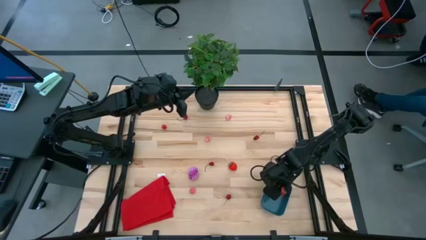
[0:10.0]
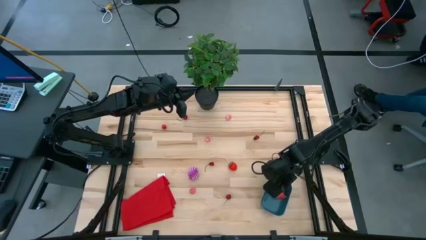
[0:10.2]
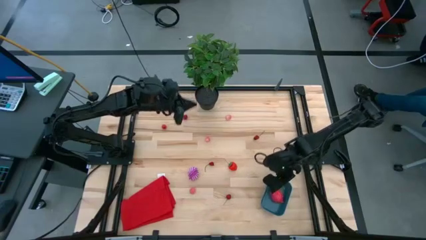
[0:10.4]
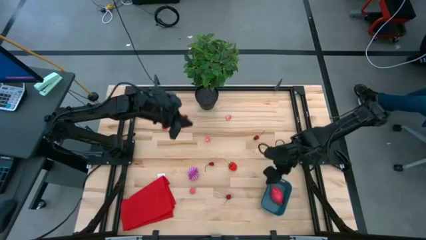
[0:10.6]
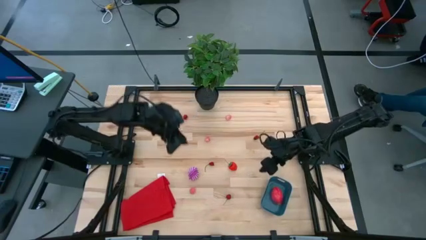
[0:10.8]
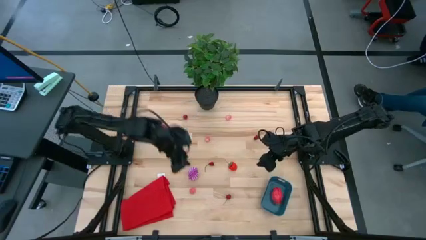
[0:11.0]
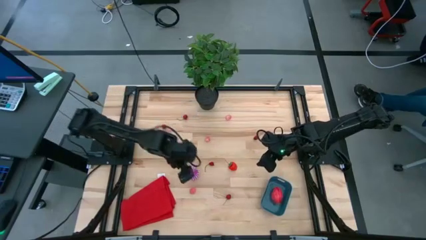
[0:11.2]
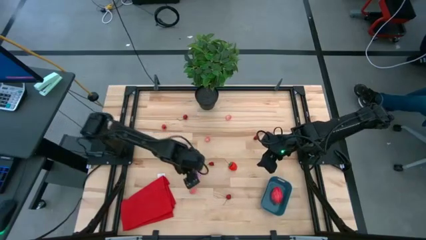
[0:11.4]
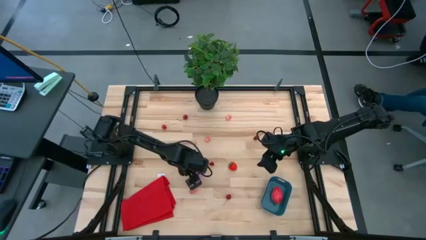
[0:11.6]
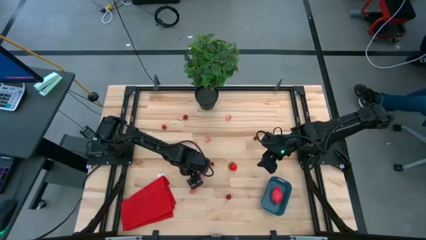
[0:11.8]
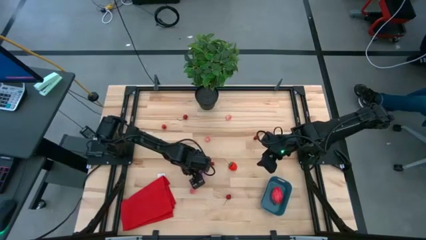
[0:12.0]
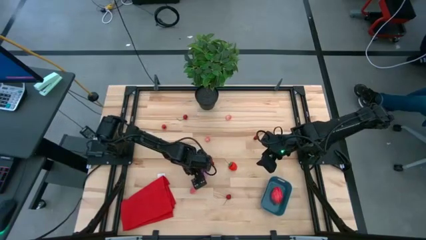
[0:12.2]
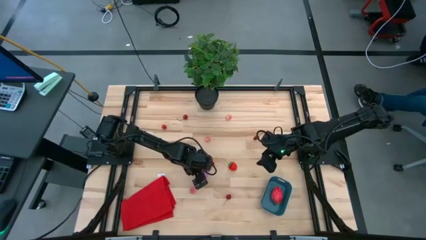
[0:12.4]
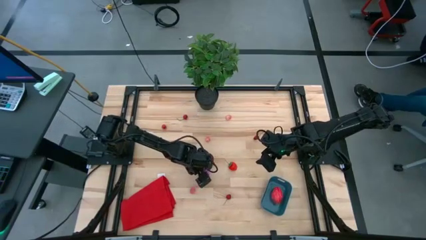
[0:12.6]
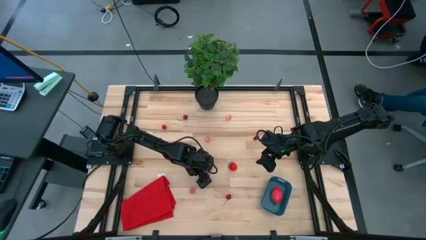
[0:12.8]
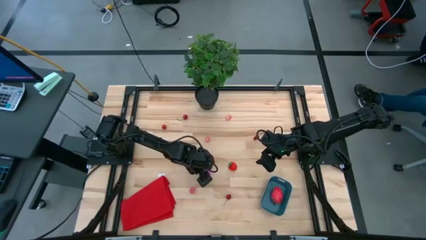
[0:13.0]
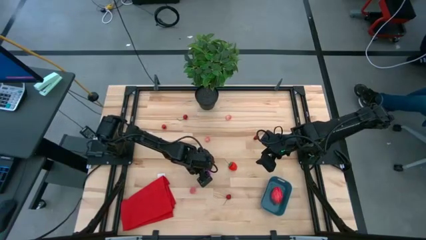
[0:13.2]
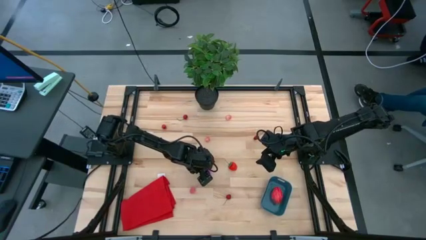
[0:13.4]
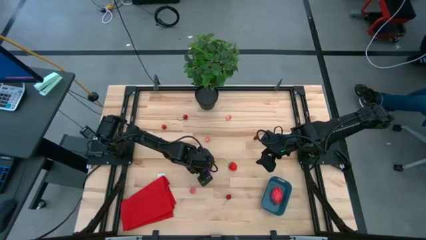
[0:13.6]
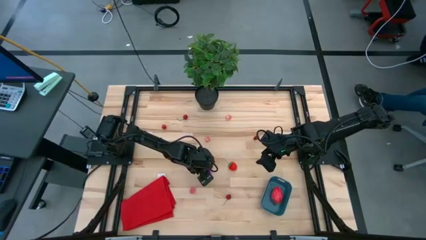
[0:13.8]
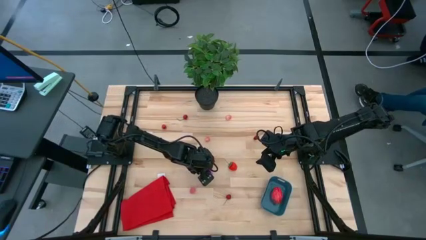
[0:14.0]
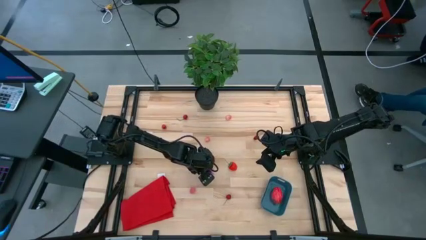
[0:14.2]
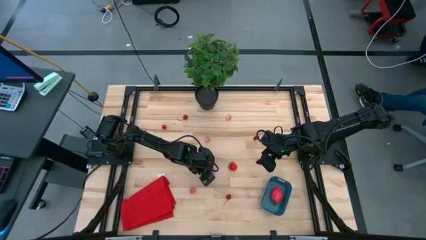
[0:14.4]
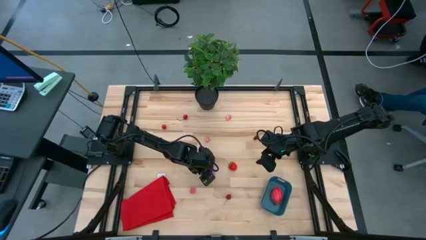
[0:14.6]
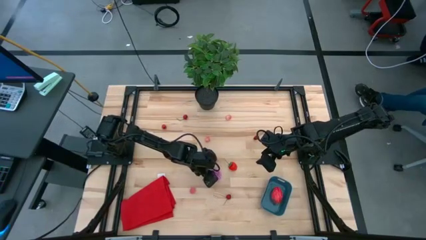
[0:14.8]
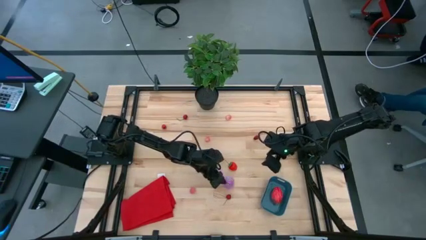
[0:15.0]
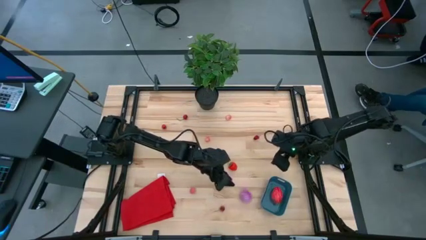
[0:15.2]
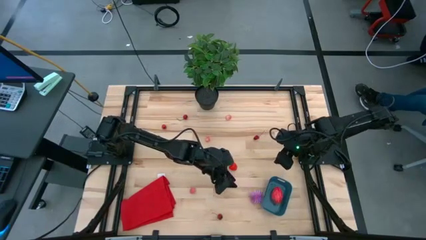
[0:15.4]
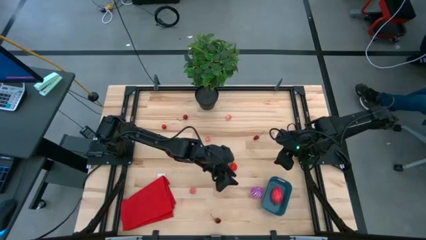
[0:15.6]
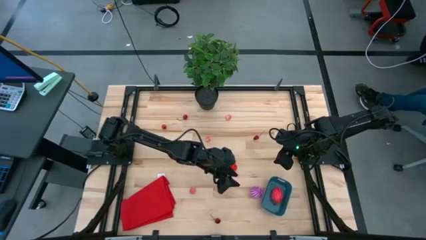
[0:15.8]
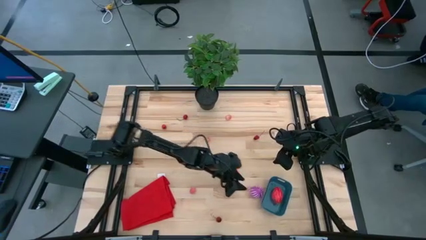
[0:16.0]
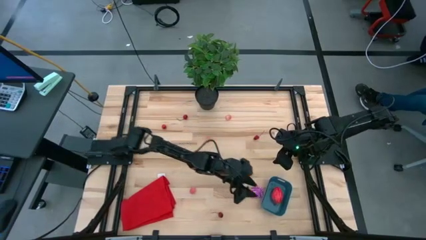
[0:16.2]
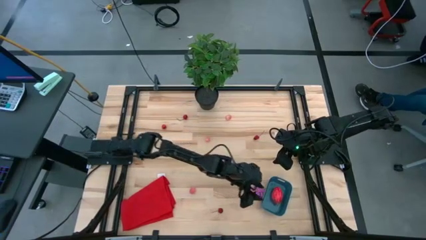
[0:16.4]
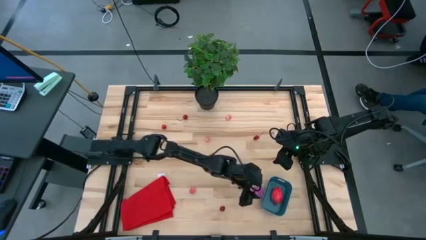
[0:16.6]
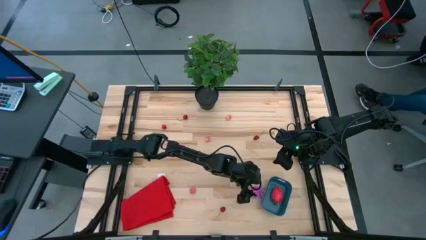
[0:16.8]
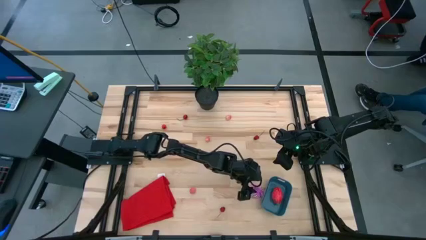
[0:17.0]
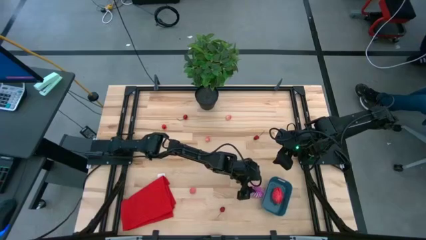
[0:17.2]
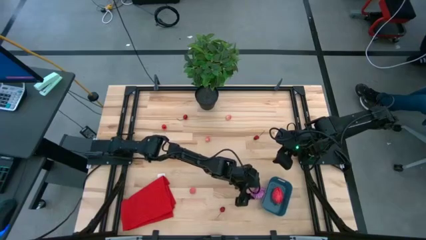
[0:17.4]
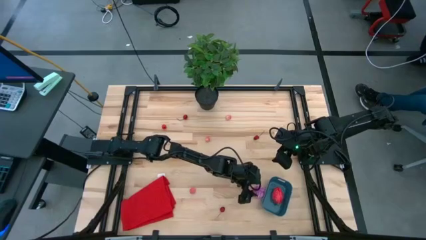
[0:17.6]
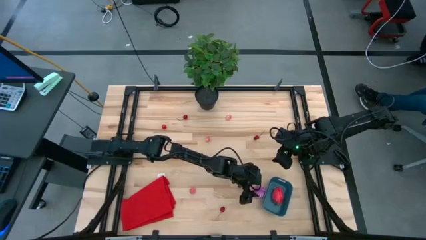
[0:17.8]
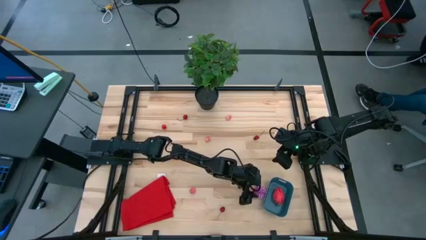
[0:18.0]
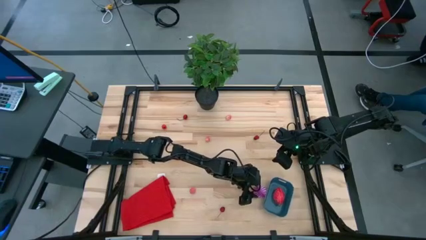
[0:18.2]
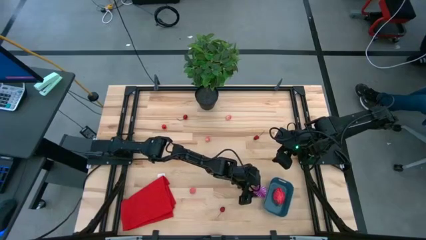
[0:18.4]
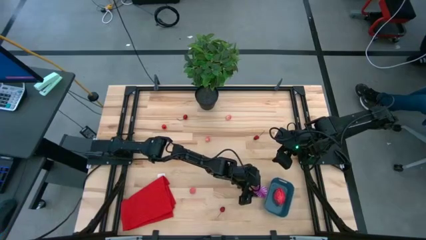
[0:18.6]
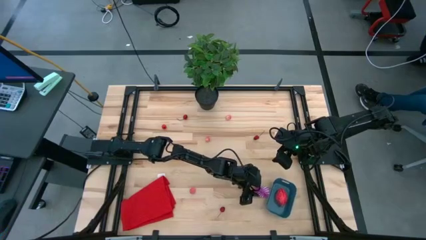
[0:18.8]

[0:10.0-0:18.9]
Task: Pick and placing Produce into tupperware
Put the onion into the bin

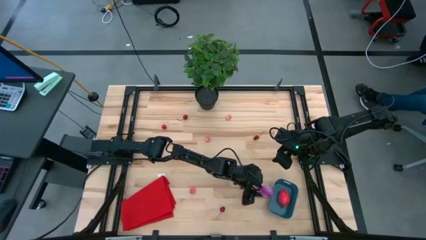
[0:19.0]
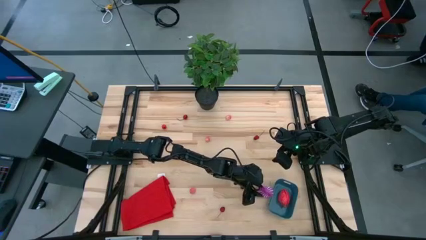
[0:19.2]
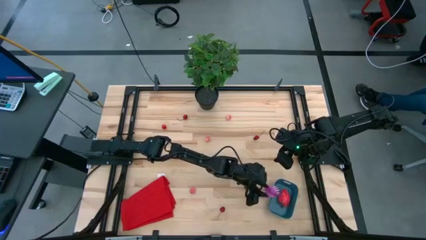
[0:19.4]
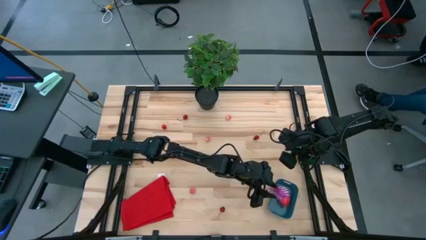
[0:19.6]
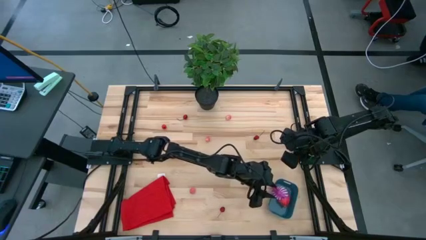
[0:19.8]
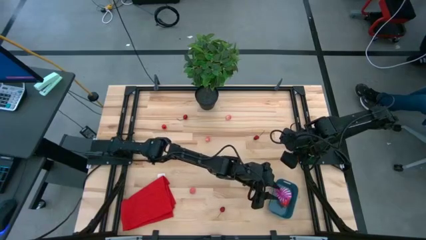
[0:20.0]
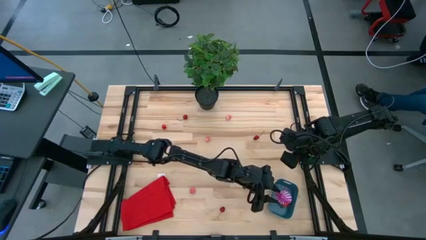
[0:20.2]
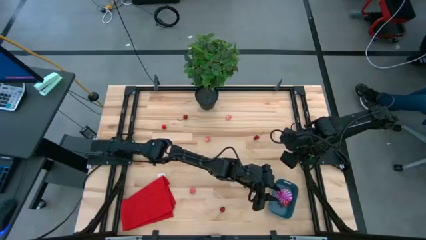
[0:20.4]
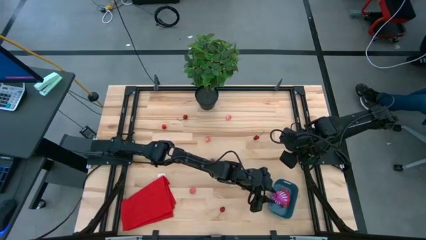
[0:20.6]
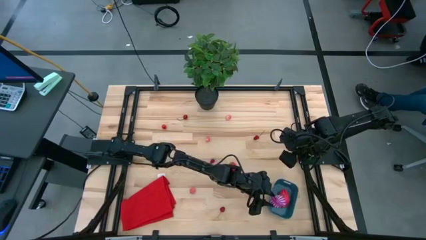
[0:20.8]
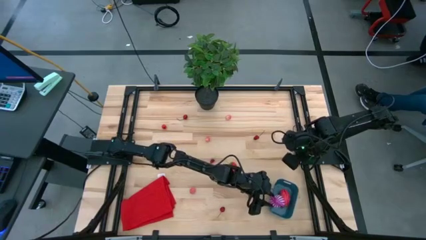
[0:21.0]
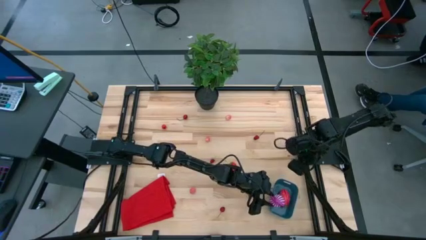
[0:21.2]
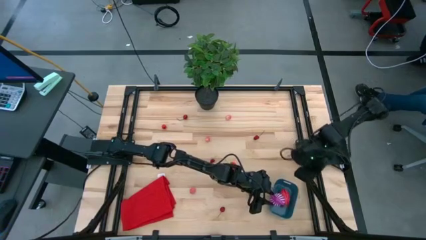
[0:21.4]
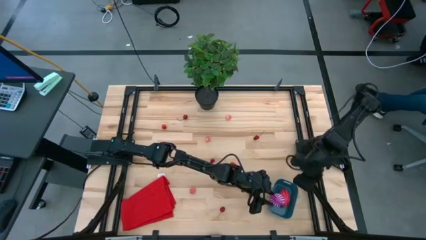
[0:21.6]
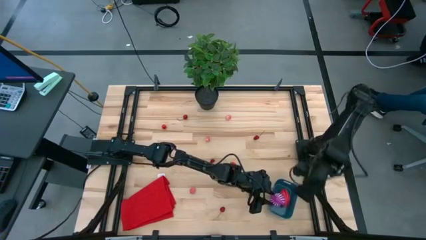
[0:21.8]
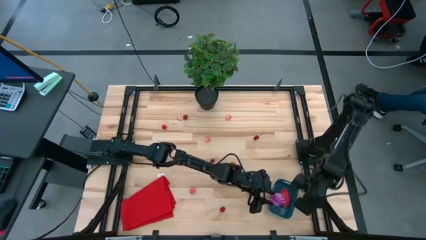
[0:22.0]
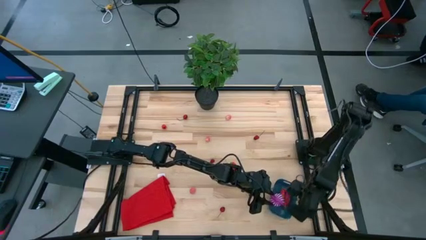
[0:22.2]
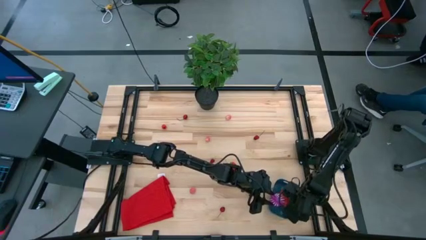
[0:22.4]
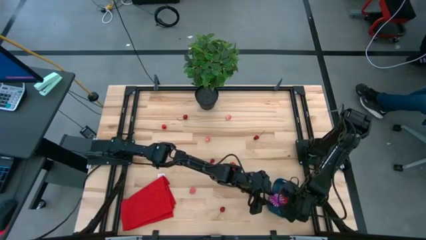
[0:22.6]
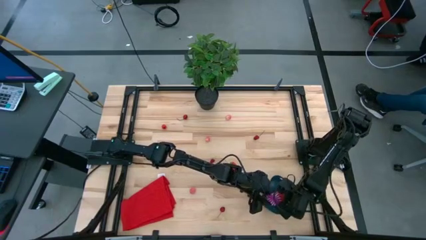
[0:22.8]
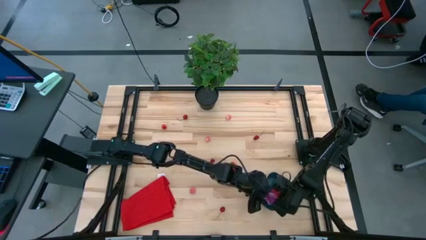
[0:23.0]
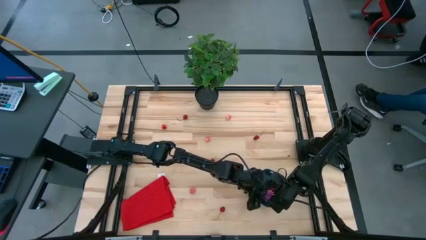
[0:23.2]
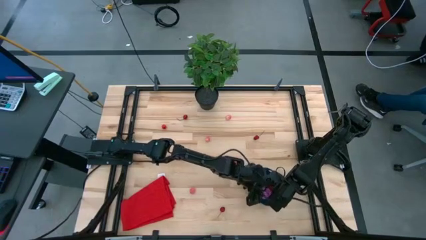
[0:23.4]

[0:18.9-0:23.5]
Put the onion into the bin

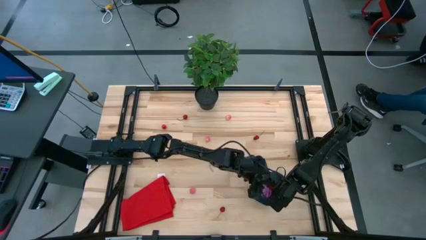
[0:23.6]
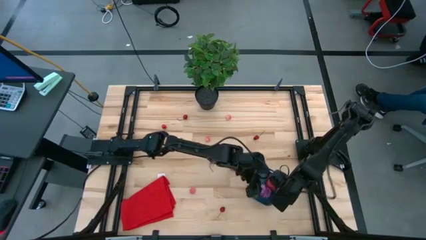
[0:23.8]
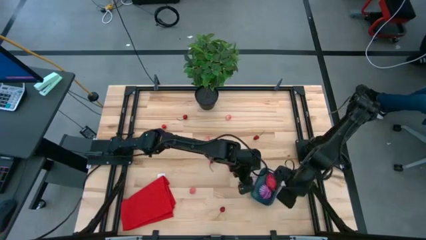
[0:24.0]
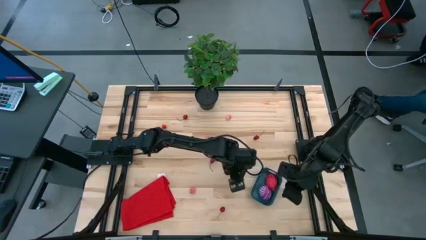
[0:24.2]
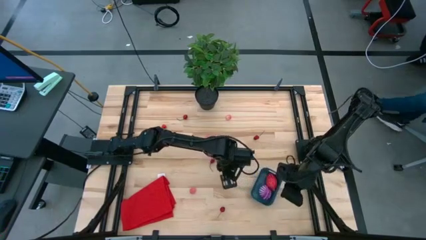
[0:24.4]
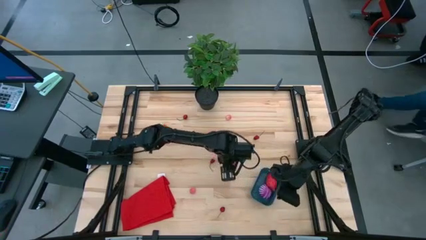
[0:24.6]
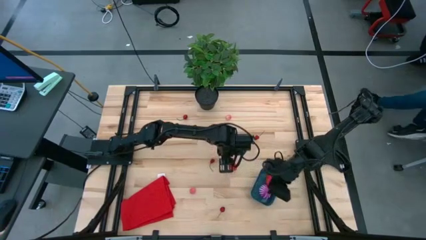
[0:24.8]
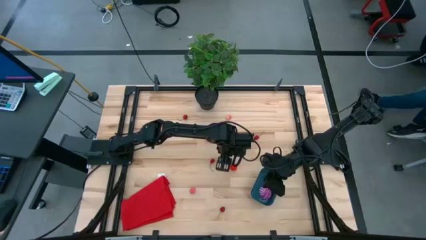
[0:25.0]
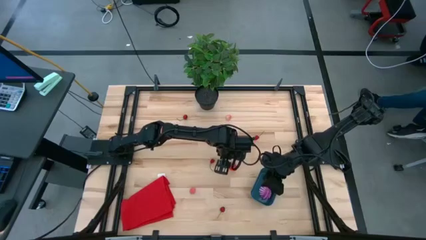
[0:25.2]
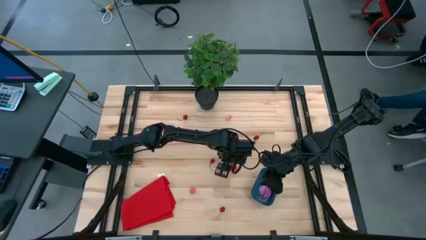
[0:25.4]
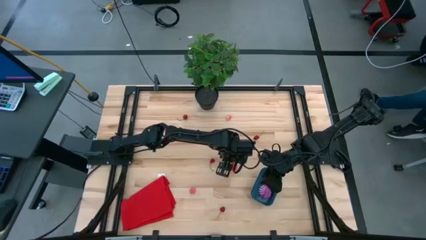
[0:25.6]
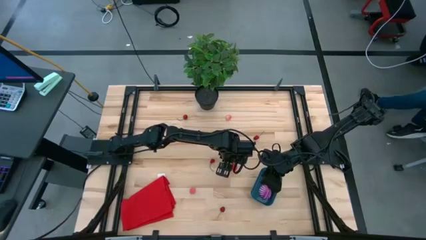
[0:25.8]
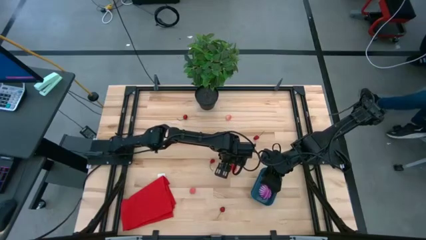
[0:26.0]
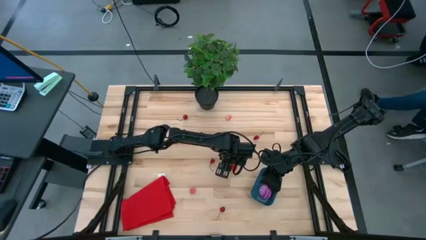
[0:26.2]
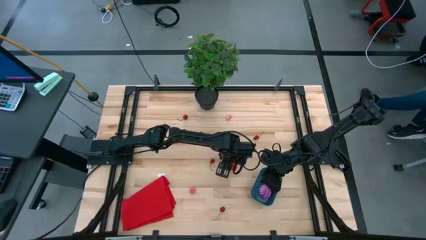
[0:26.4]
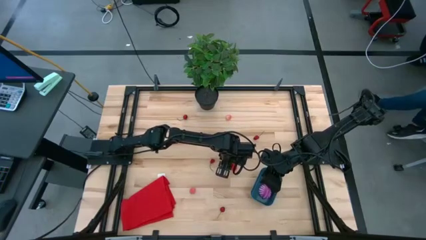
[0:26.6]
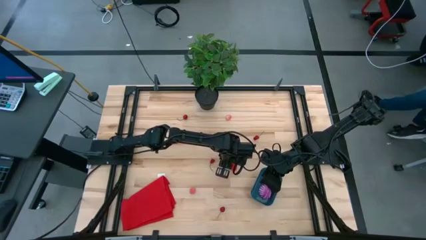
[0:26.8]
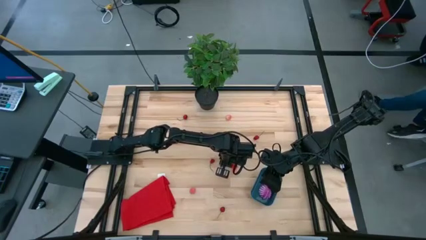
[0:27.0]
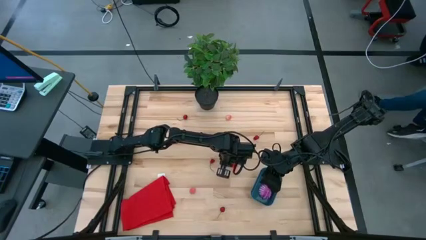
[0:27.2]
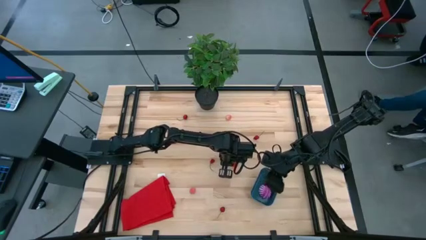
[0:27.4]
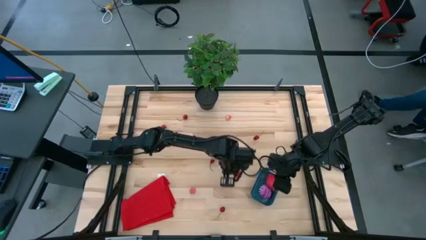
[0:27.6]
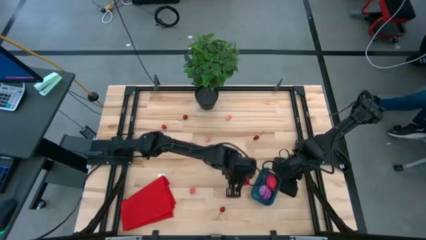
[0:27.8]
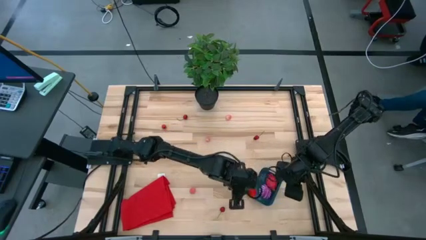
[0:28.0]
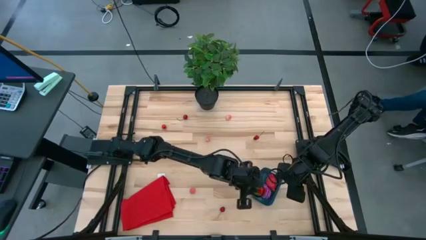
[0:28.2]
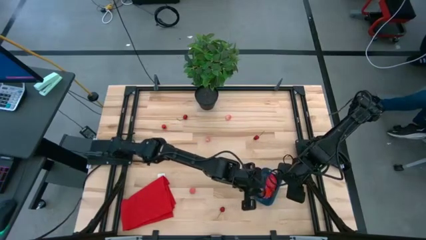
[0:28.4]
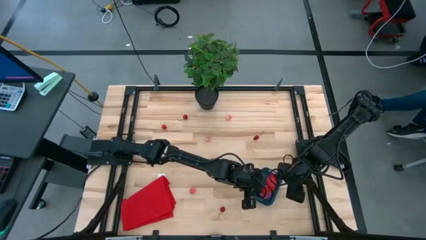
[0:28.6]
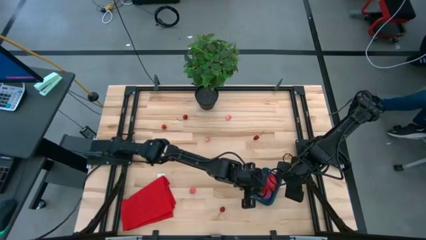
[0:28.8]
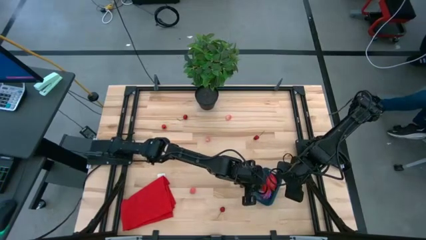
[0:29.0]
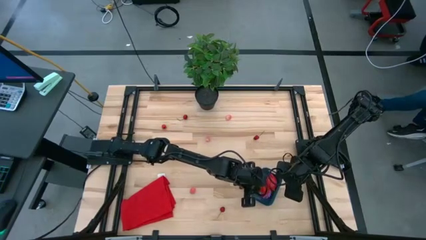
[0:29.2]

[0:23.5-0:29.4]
Put the strawberry into the bin
